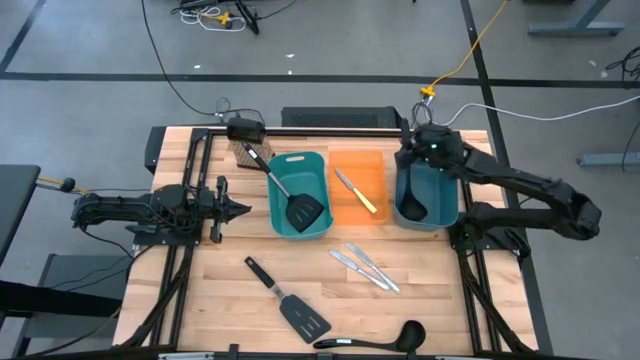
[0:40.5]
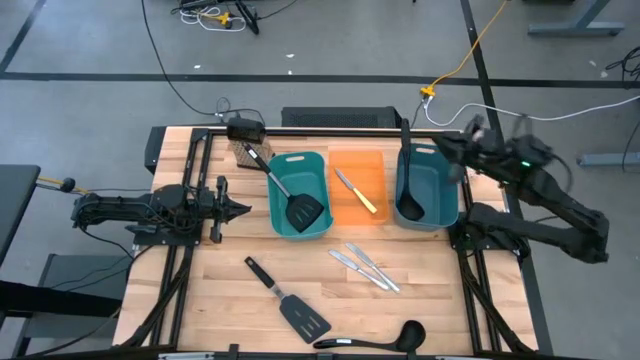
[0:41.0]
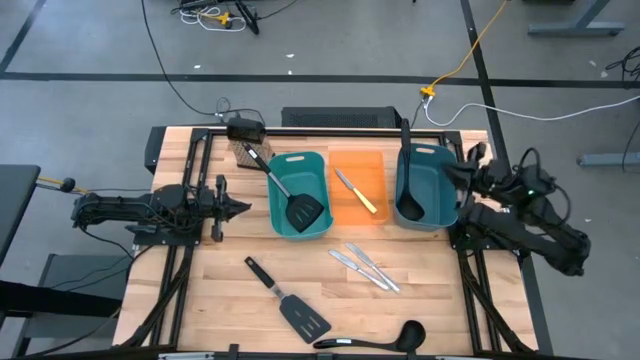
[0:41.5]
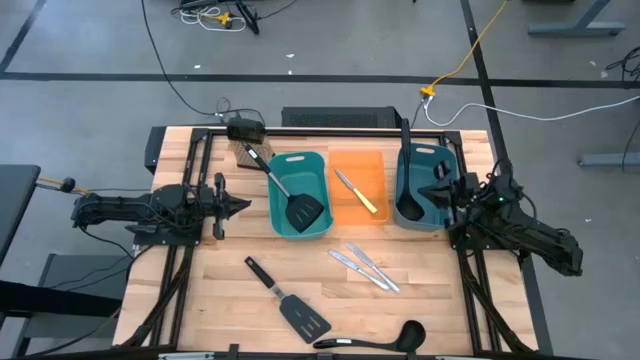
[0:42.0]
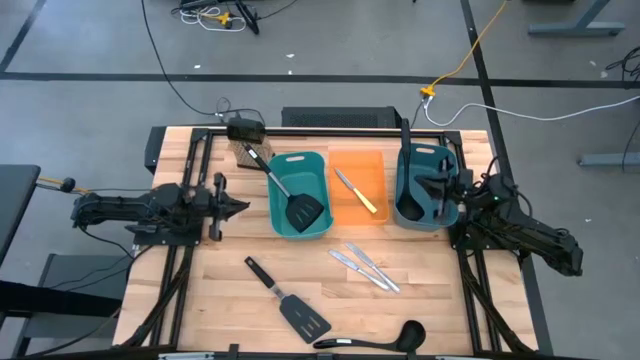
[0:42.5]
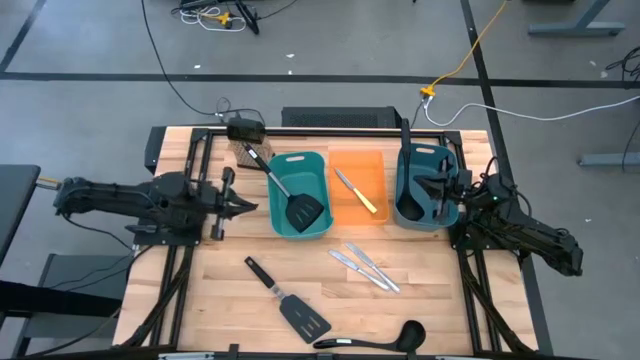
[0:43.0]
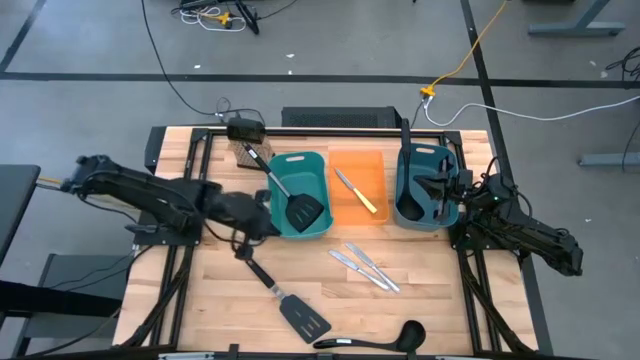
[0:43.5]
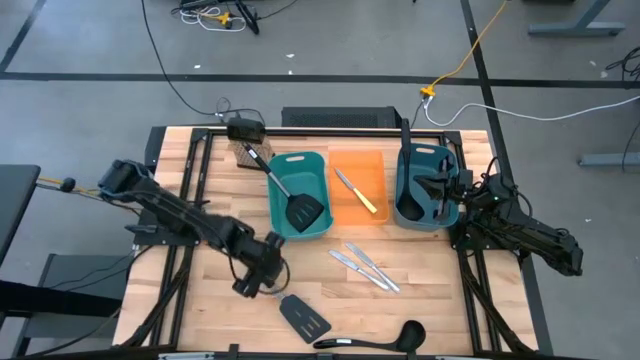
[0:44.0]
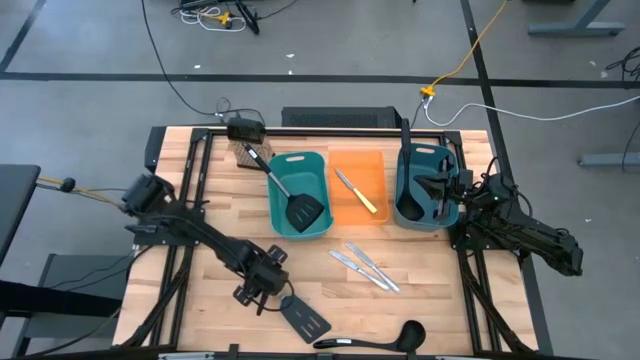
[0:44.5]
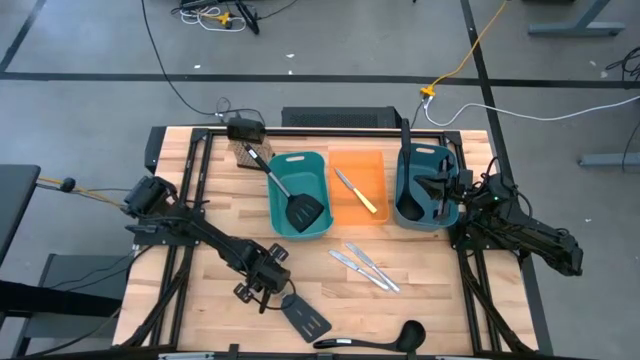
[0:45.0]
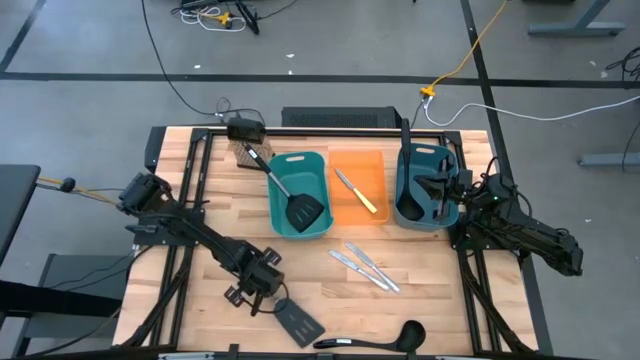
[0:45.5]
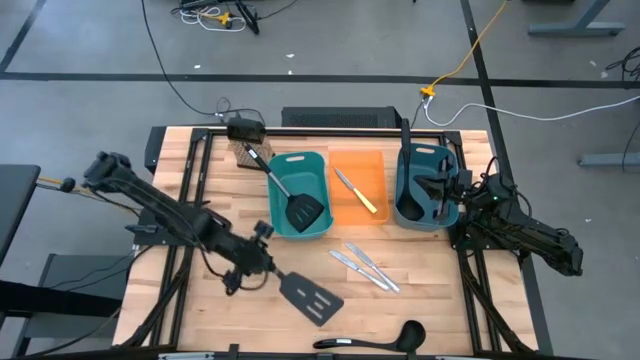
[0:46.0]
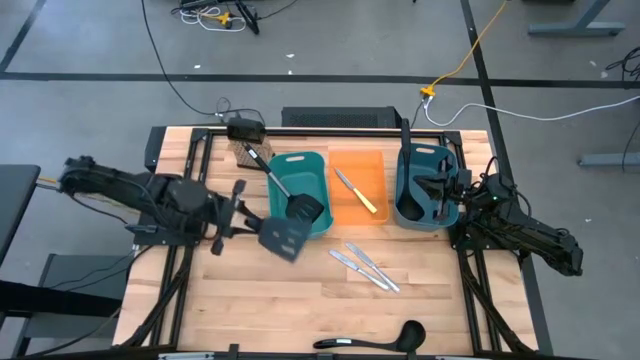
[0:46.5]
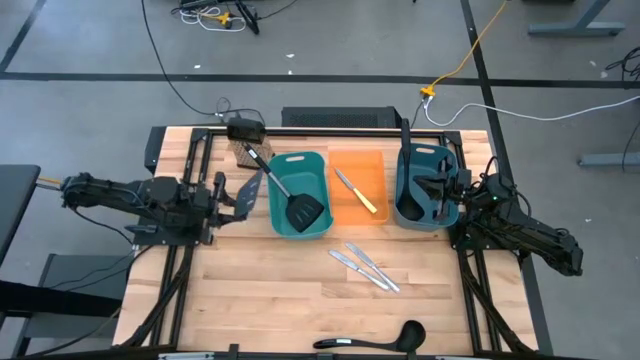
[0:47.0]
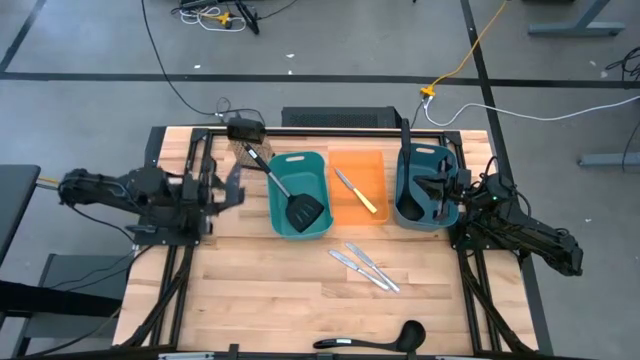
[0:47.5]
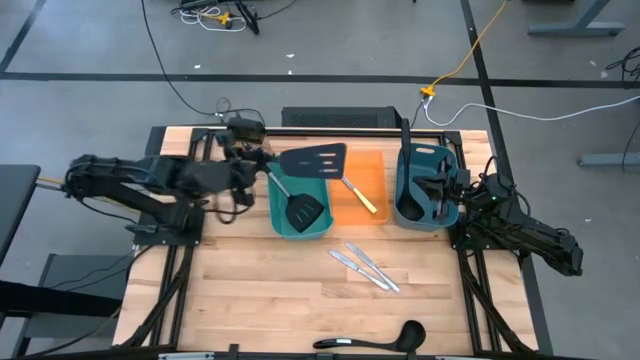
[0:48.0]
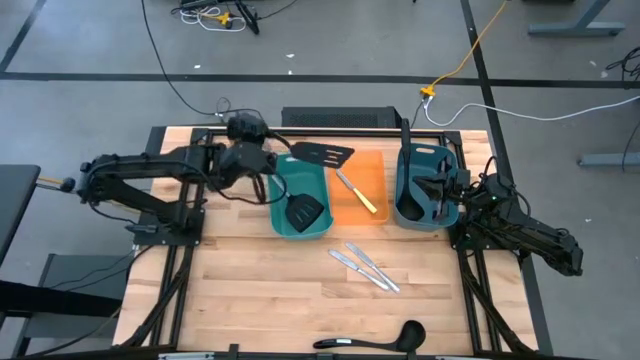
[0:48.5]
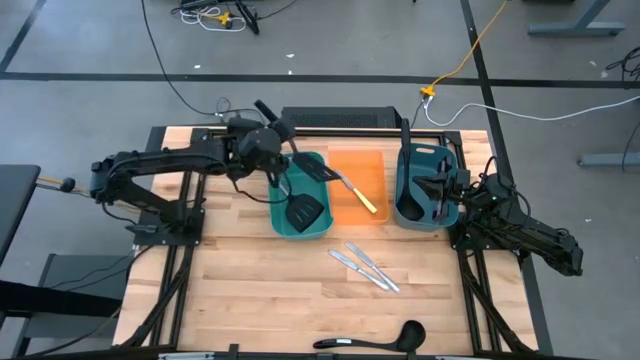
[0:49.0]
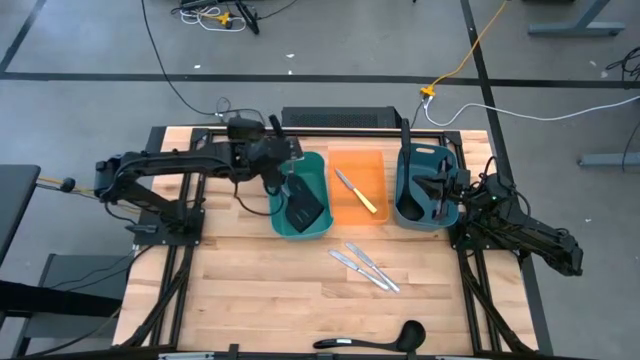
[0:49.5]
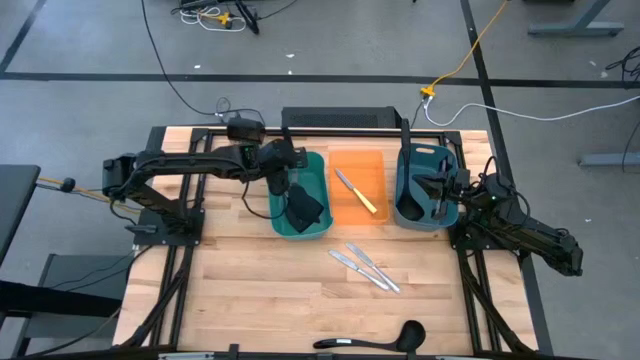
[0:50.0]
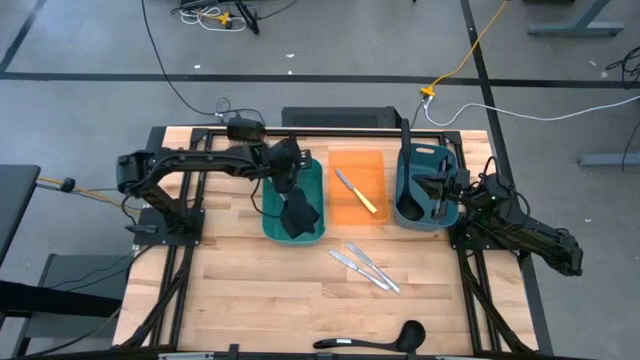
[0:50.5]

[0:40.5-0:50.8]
Task: Pick & Place Kitchen Items
Put the black spatula into the green bin

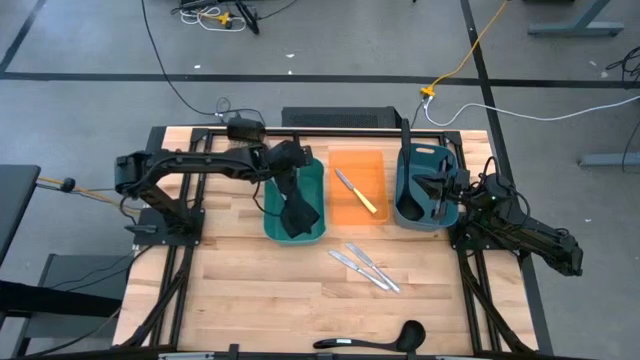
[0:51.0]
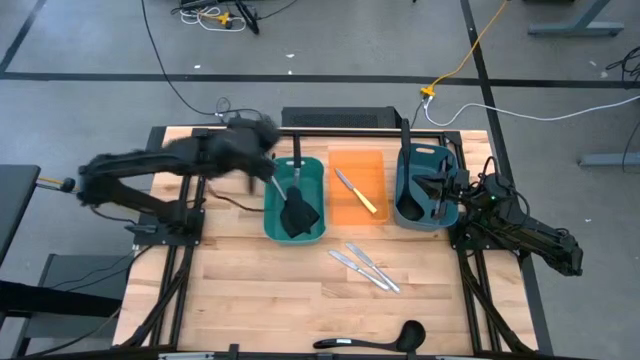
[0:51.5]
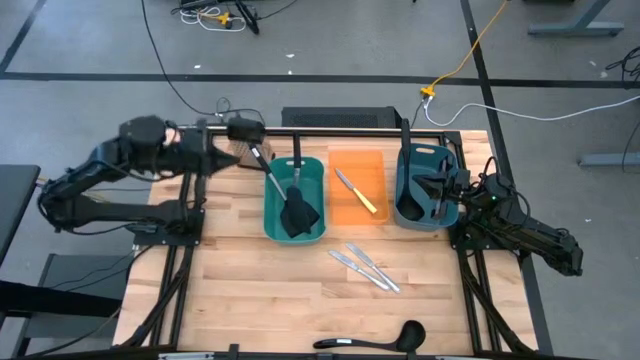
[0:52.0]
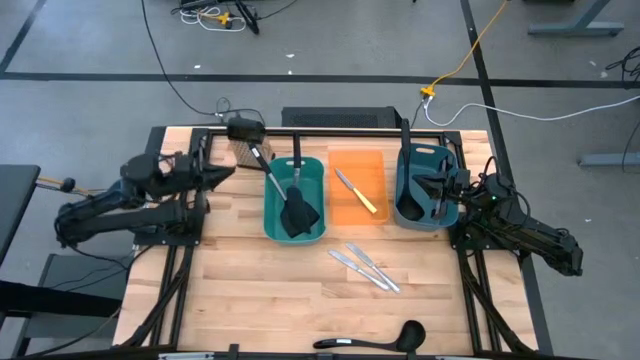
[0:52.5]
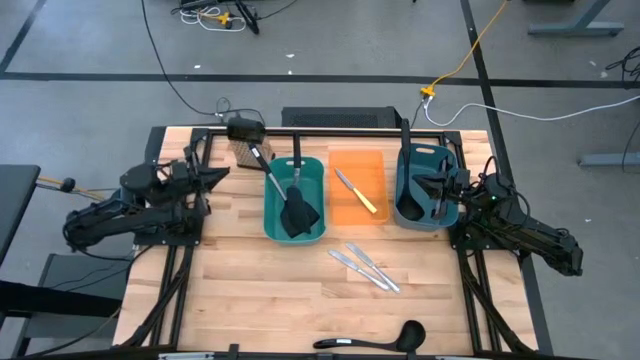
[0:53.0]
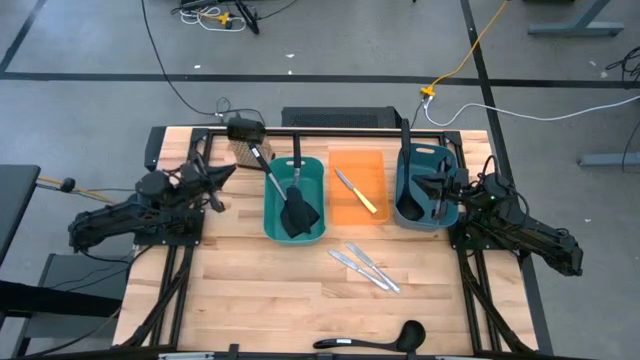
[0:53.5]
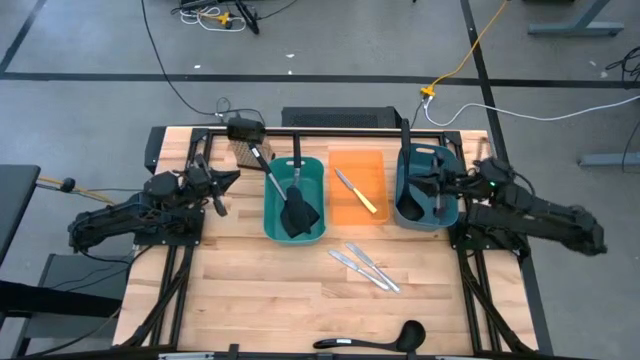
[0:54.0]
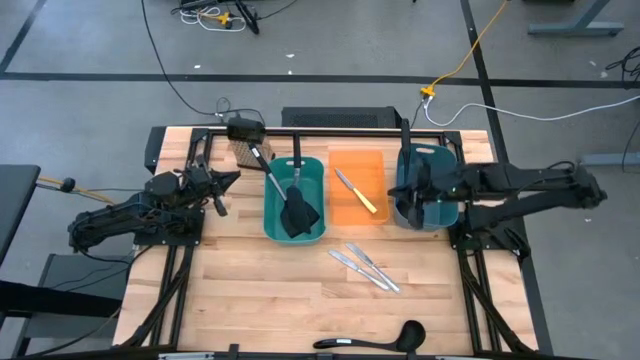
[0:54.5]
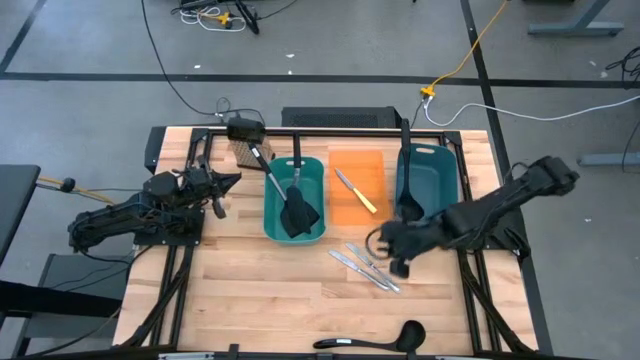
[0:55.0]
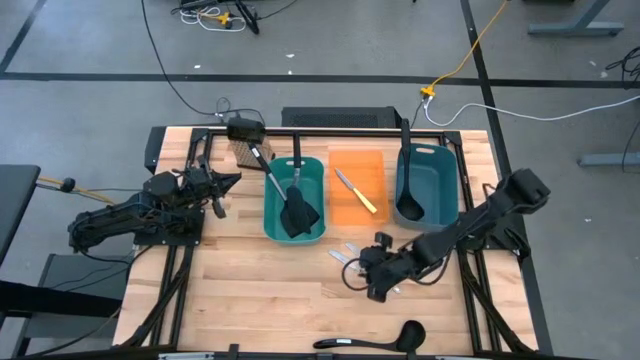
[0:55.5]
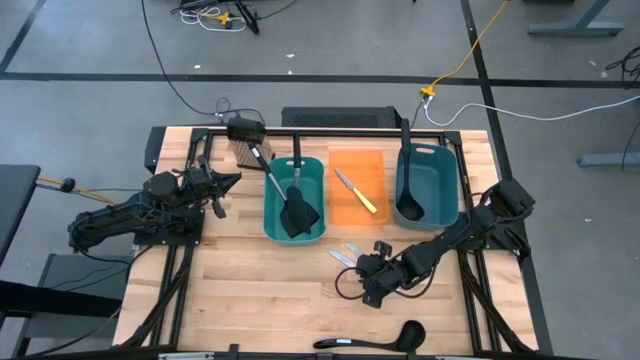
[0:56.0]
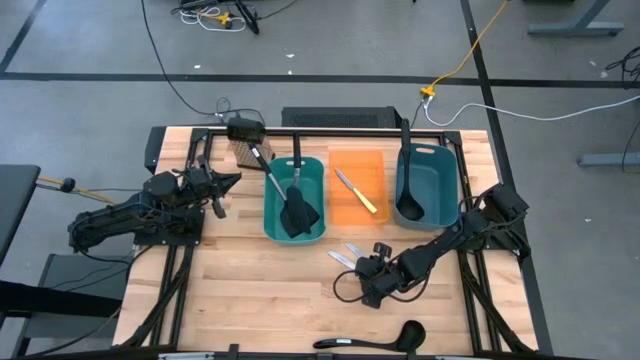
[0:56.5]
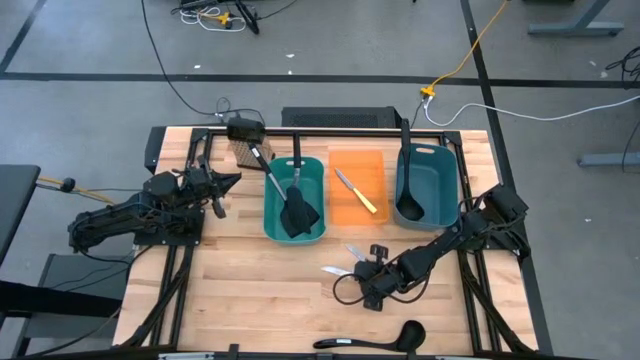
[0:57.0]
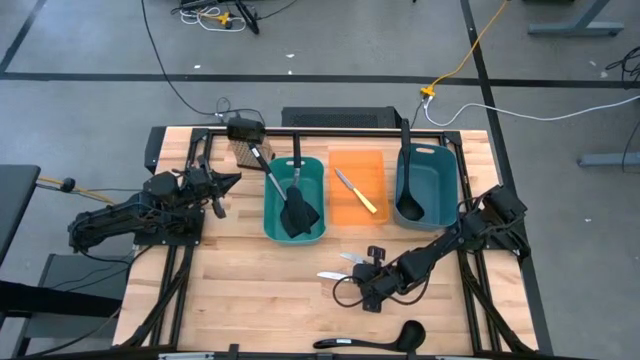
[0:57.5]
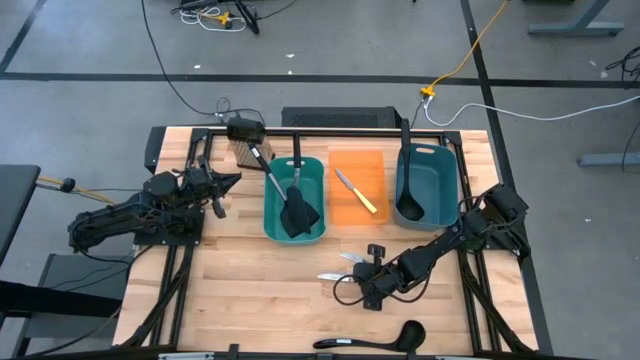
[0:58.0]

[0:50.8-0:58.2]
Put the bottom silver table knife into the orange bin

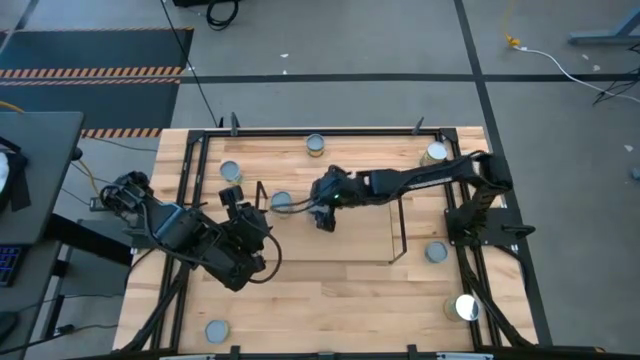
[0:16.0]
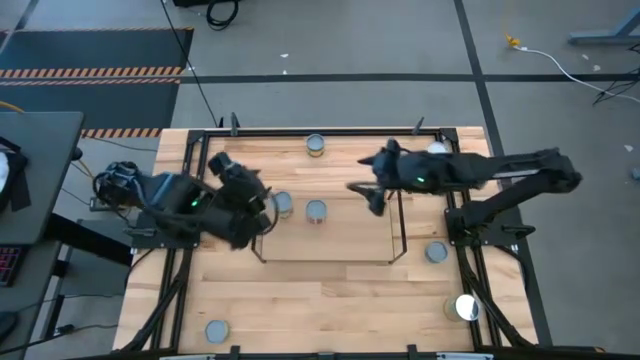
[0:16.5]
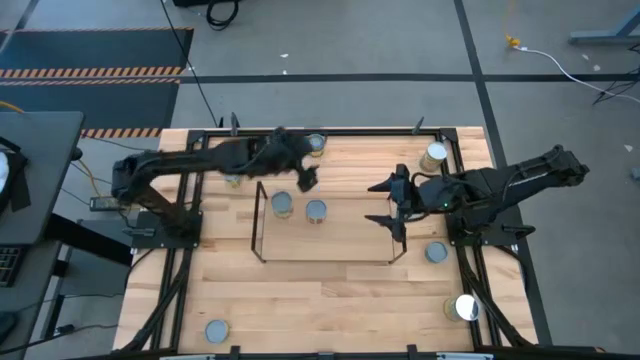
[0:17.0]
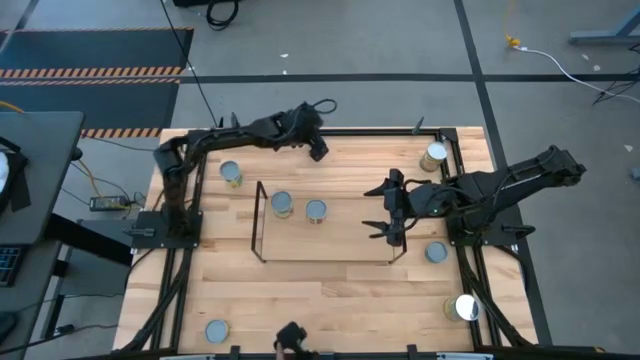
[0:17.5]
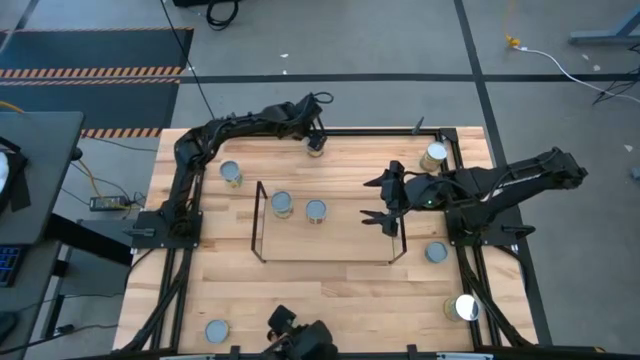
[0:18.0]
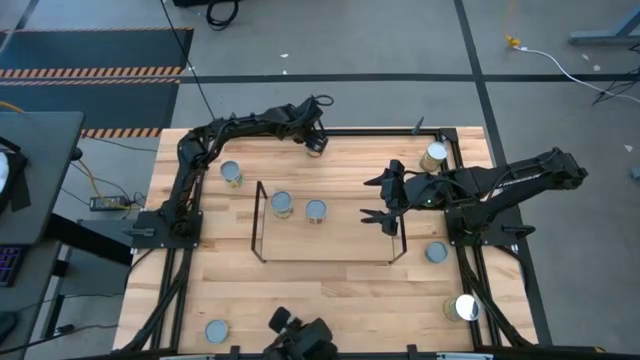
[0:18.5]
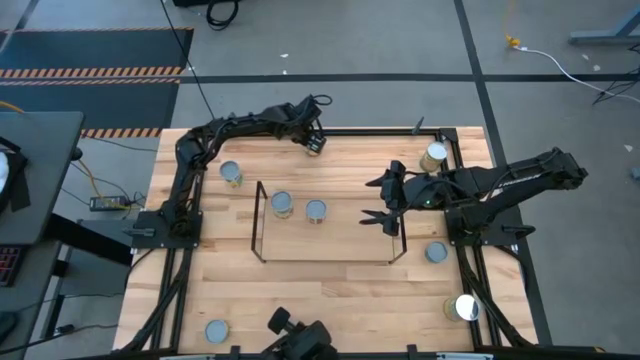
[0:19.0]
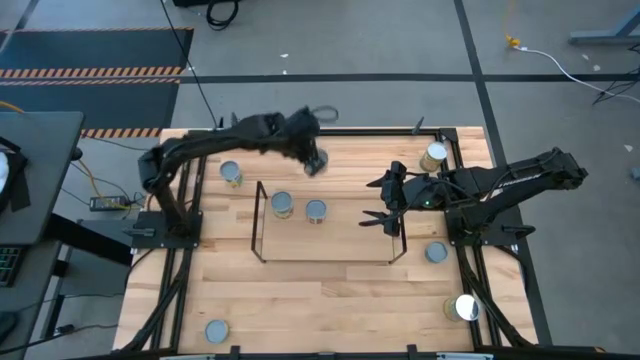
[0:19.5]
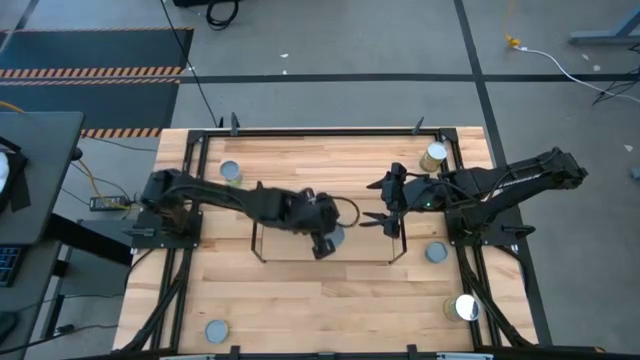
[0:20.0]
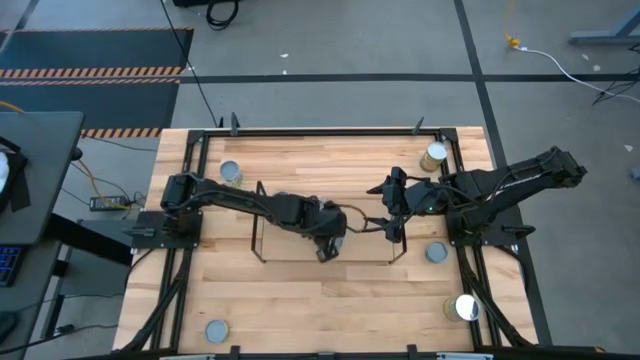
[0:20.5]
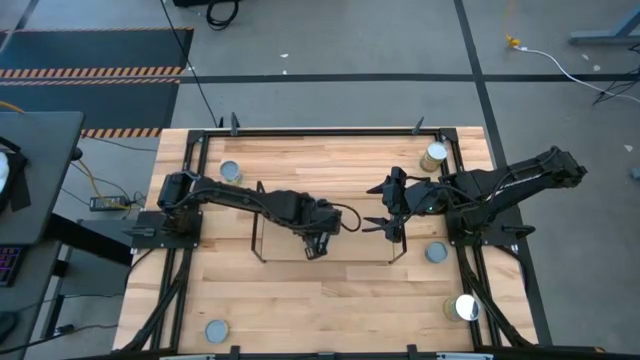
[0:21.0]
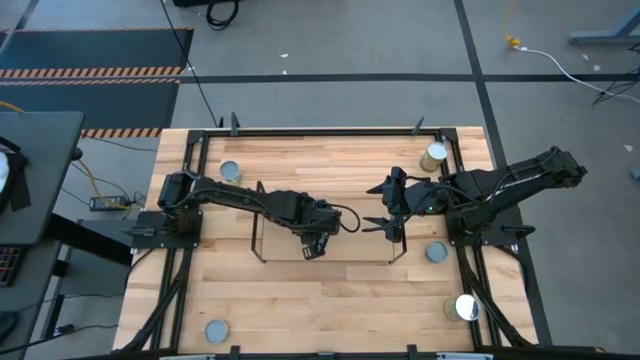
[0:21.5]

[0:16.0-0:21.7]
Task: Pick and place cans onto a shelf
Put the dark green can on the shelf aligned with the red can
